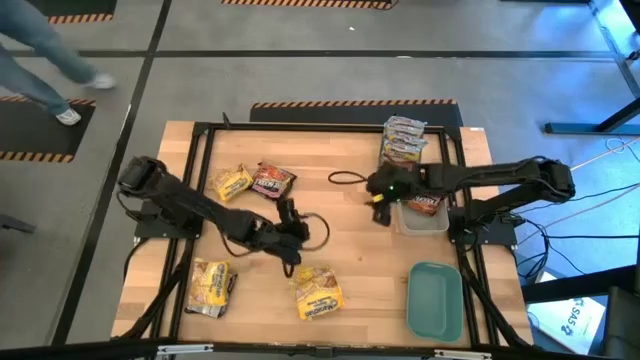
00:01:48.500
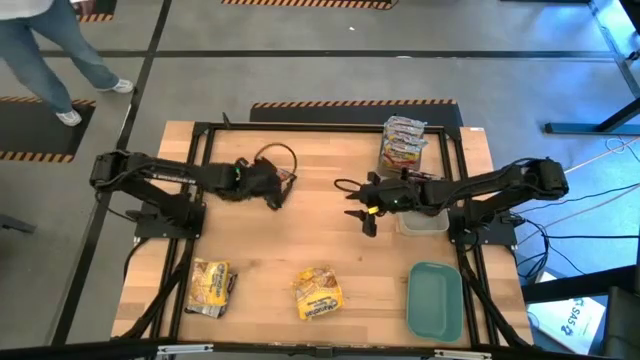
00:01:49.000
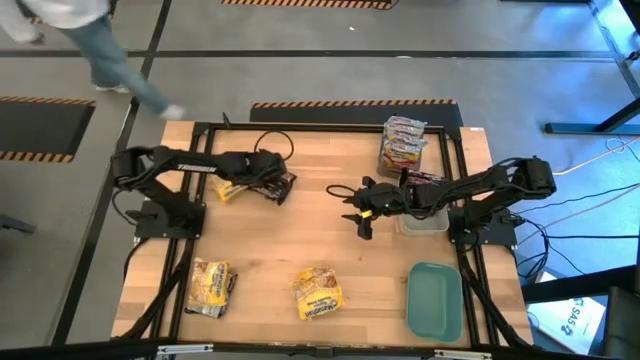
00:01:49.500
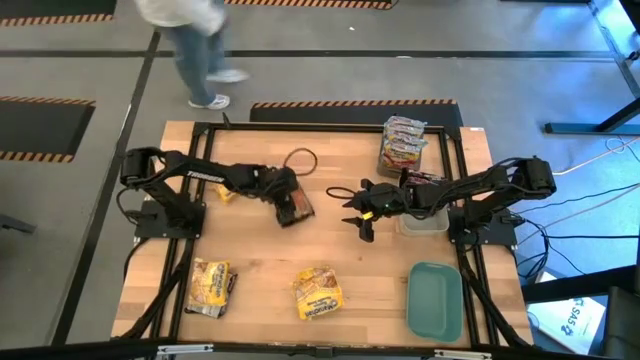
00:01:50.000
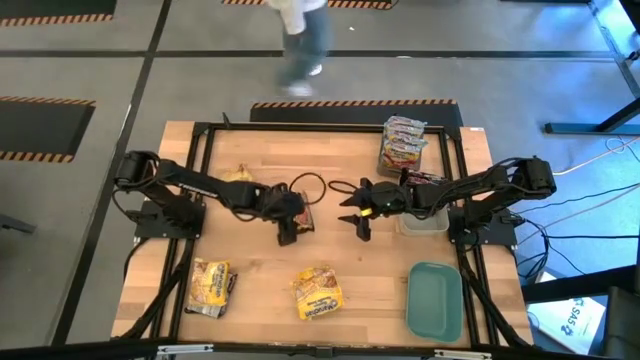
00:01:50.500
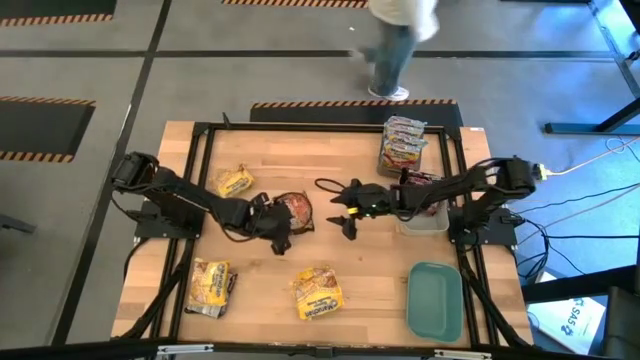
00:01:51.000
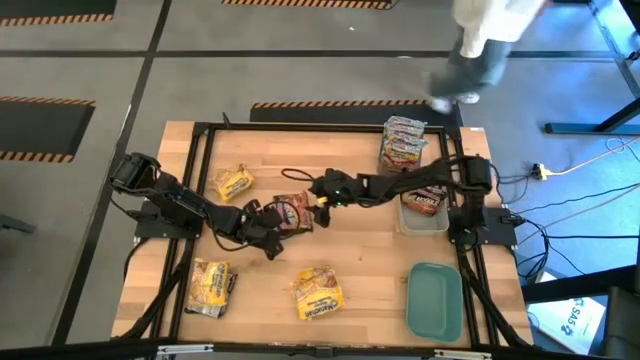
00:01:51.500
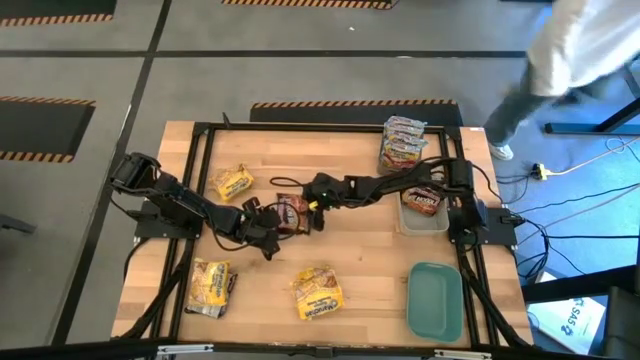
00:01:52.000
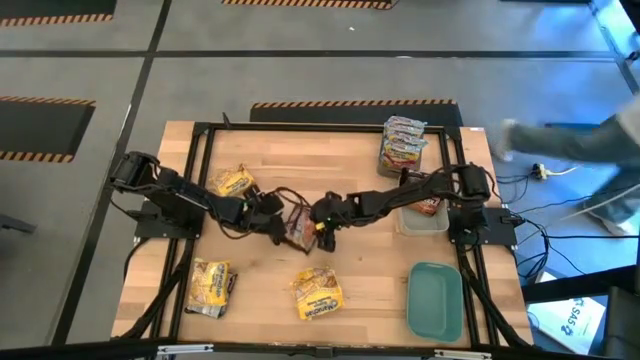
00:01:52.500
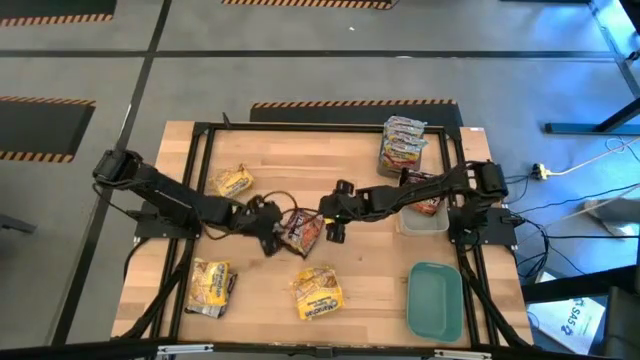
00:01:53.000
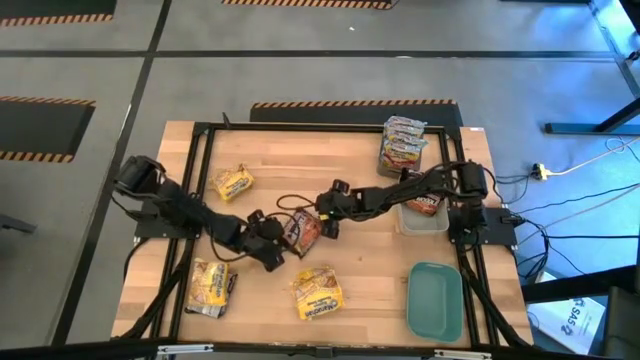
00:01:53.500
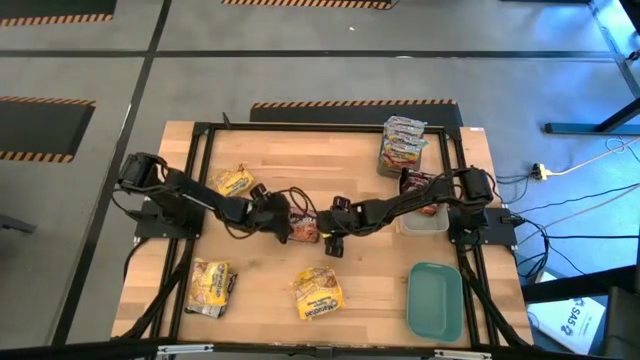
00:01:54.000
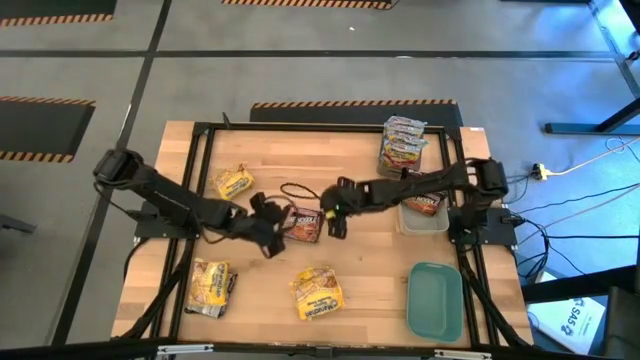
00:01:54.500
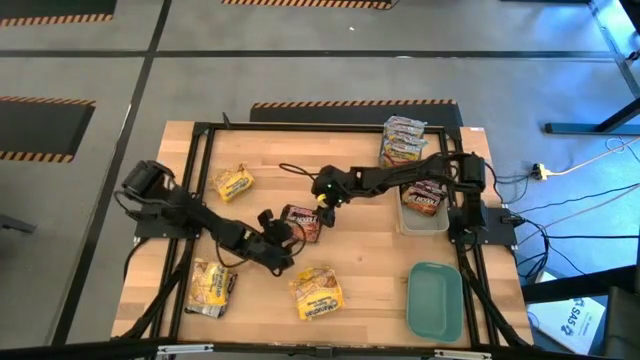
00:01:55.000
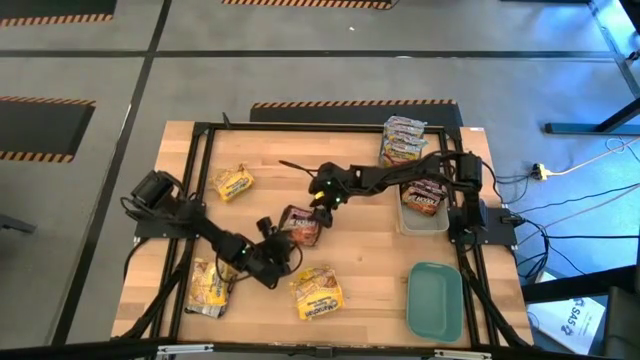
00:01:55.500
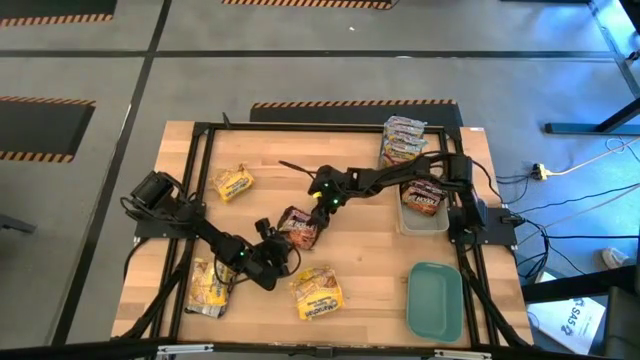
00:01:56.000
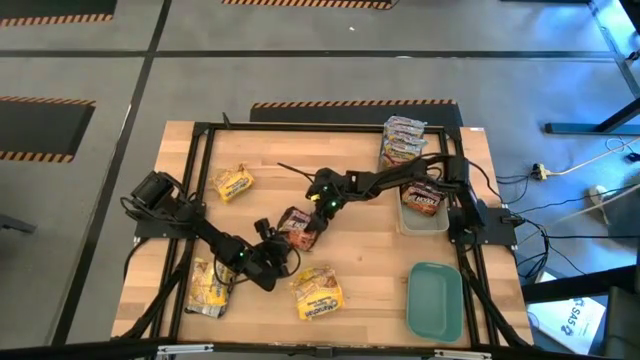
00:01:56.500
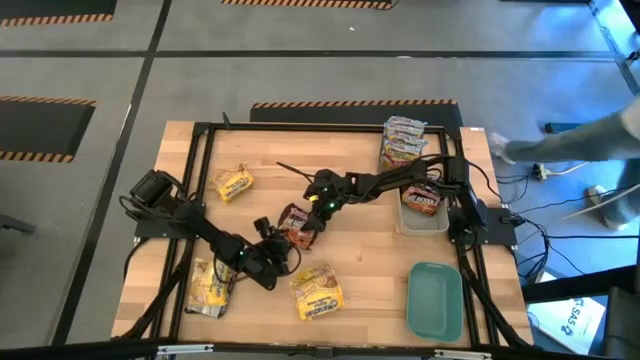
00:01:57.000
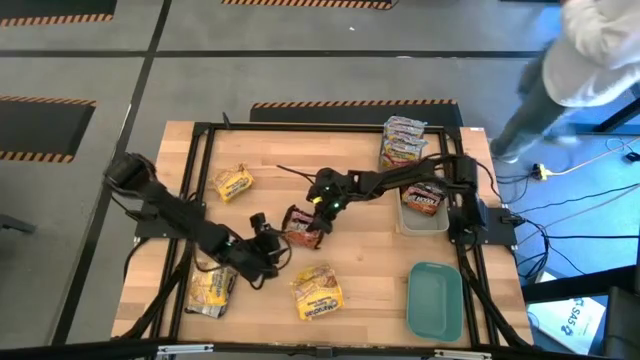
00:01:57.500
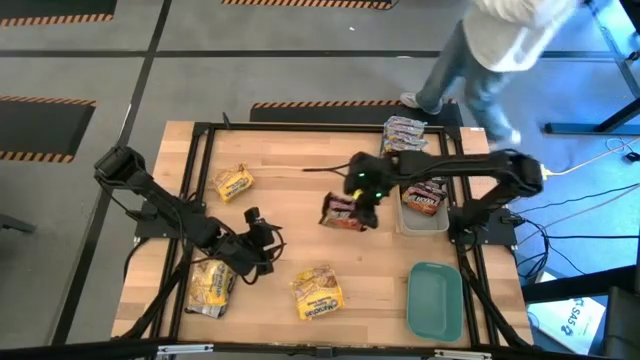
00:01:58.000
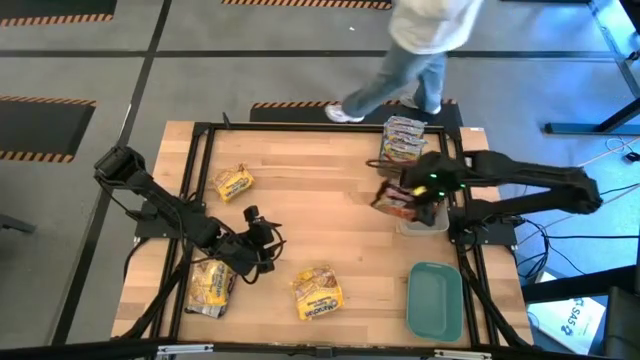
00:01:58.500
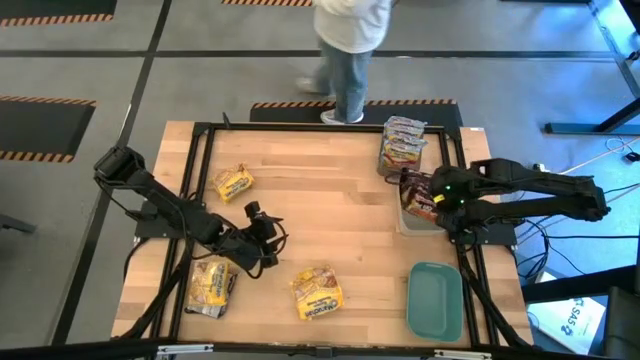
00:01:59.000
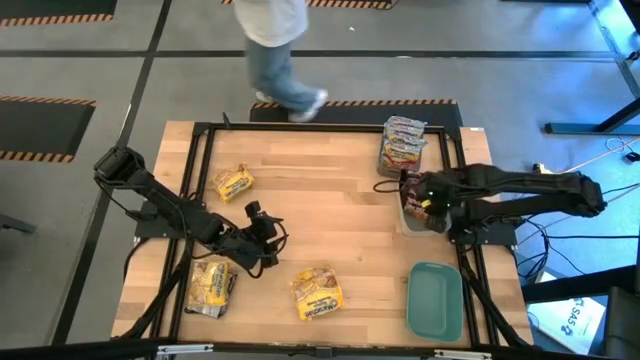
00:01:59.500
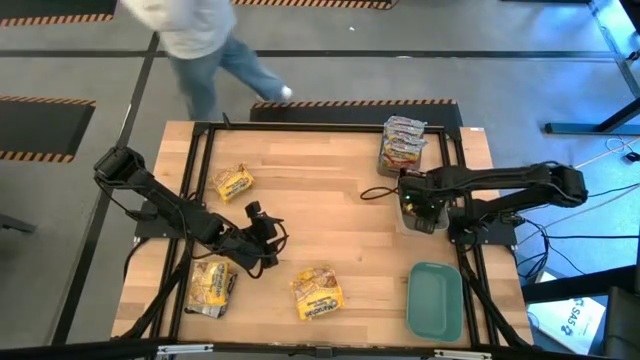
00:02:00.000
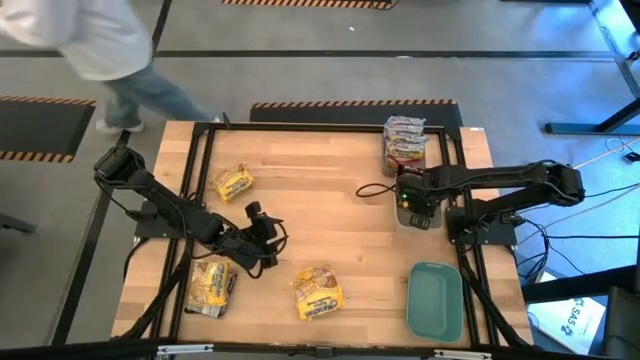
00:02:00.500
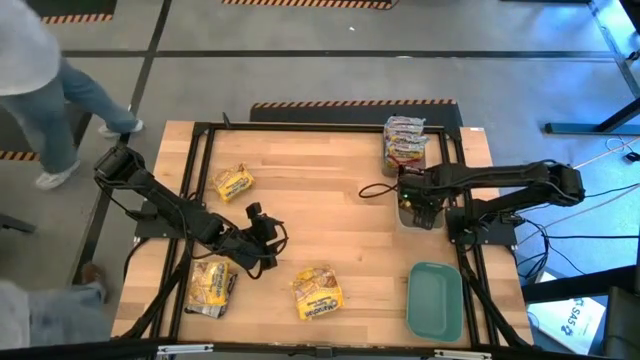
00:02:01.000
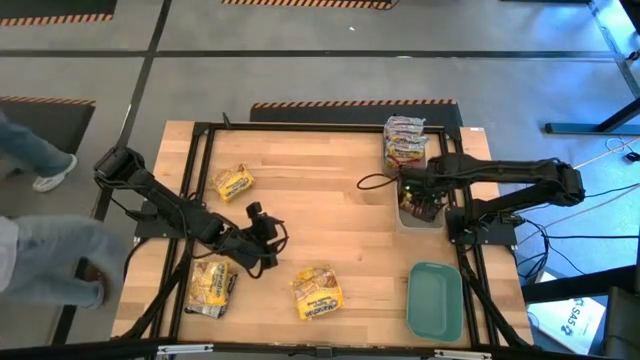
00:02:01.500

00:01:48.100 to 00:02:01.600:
Task: Sort Maruchan noodles
Put the top black noodle pack into the gray bin

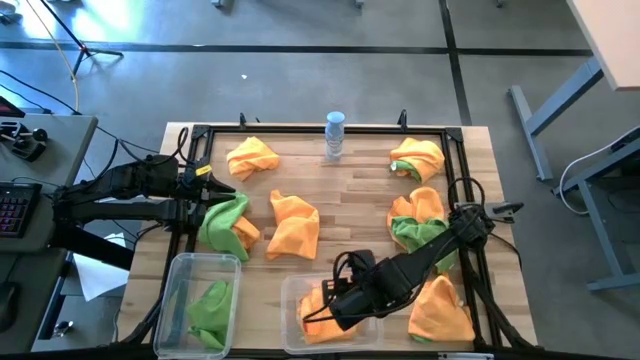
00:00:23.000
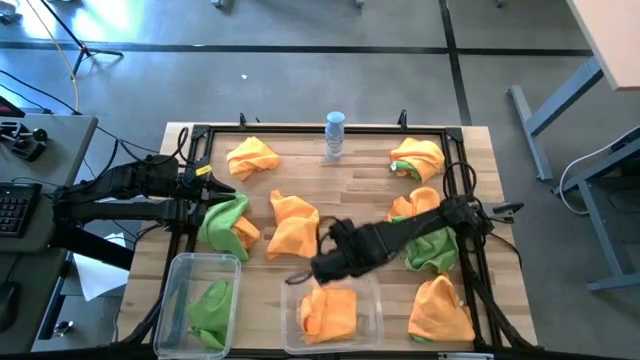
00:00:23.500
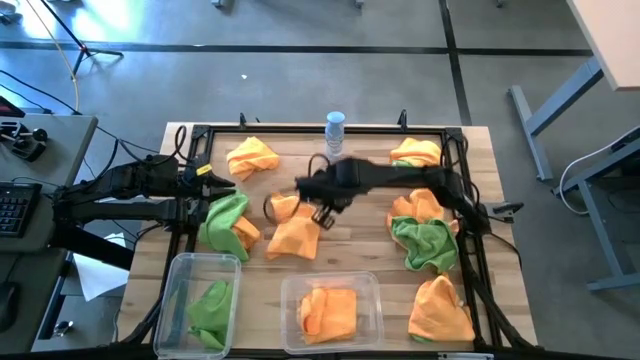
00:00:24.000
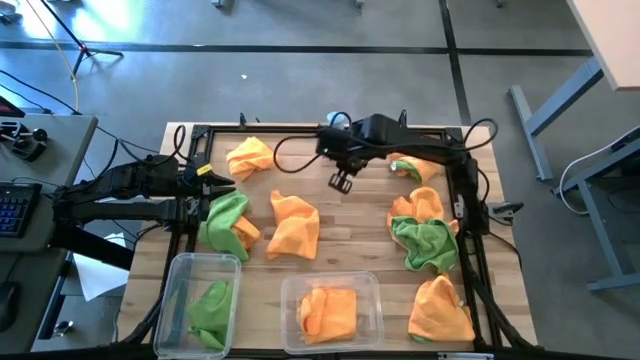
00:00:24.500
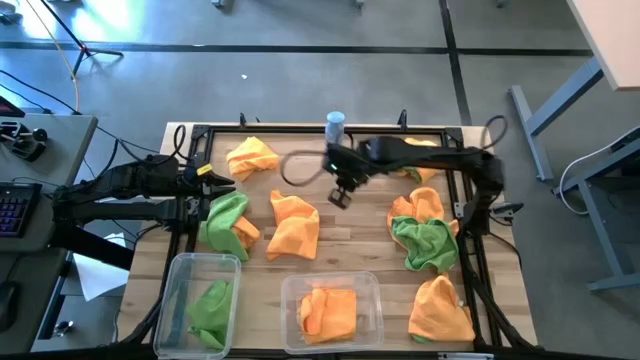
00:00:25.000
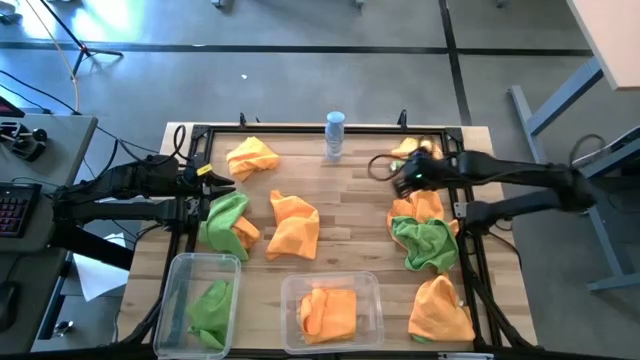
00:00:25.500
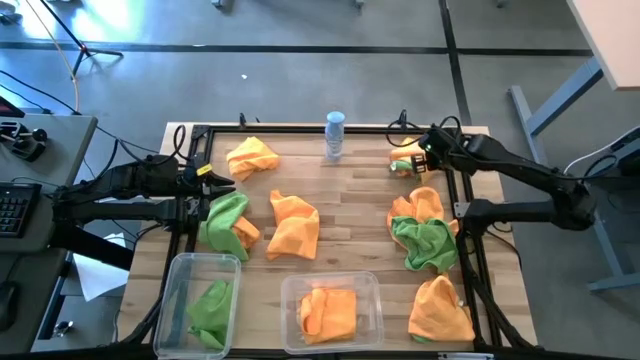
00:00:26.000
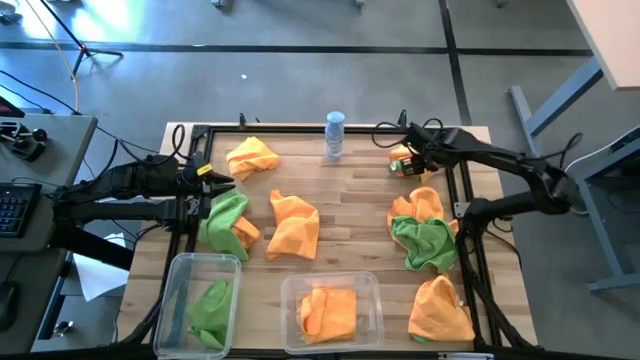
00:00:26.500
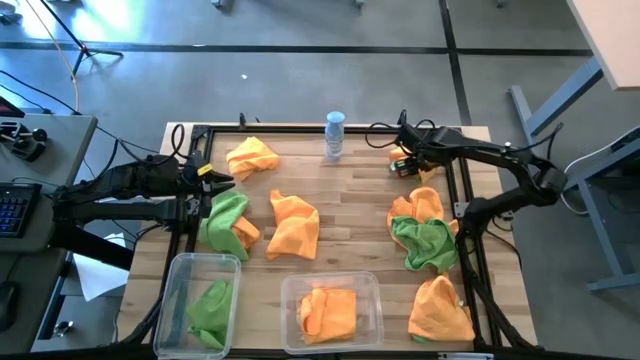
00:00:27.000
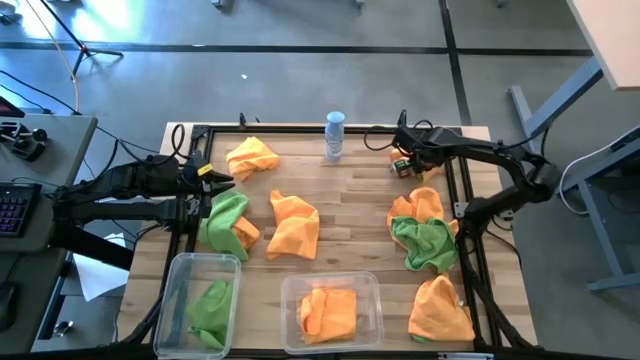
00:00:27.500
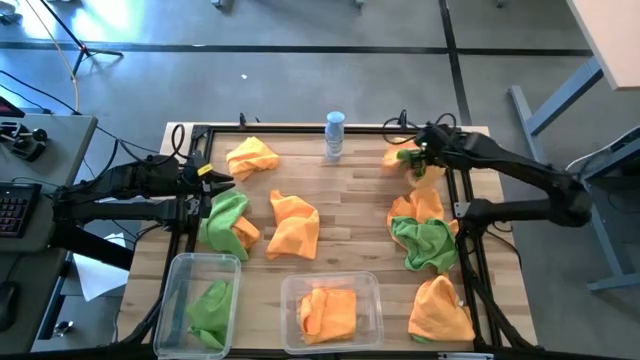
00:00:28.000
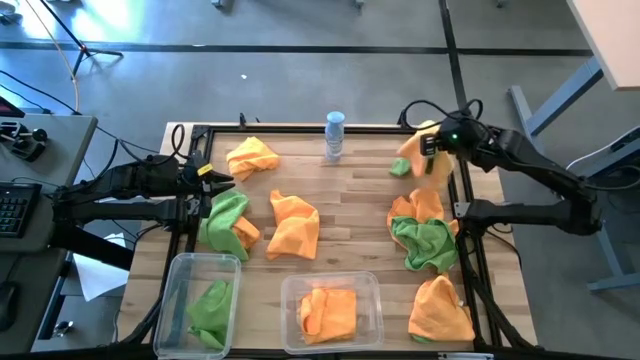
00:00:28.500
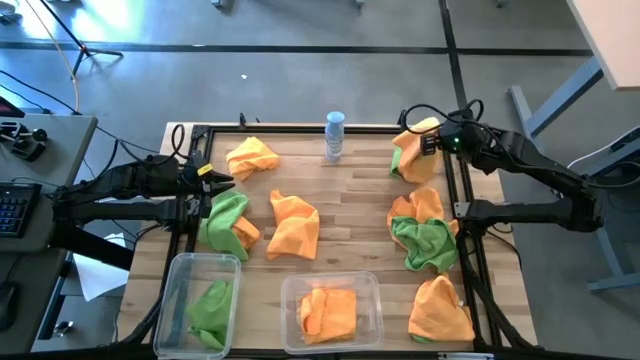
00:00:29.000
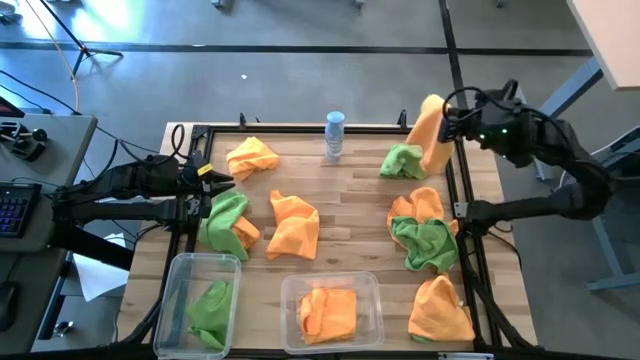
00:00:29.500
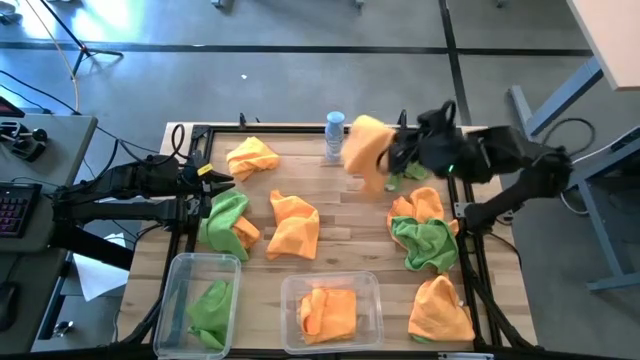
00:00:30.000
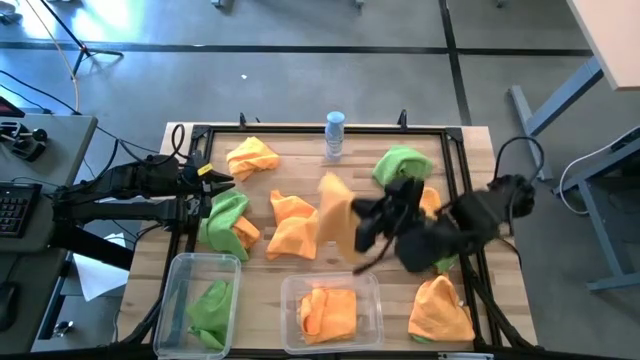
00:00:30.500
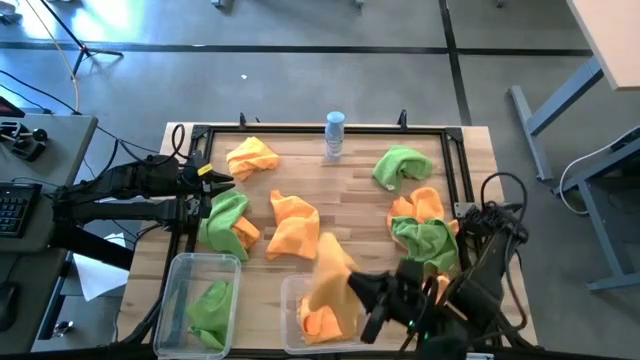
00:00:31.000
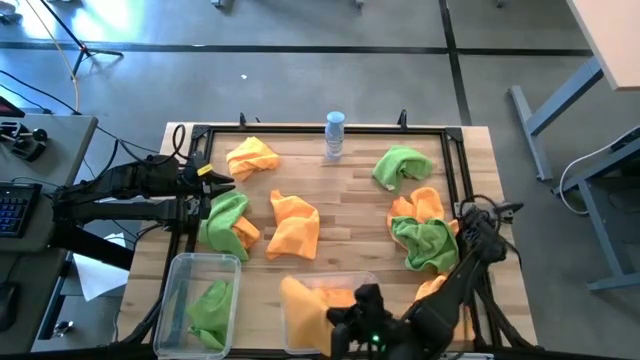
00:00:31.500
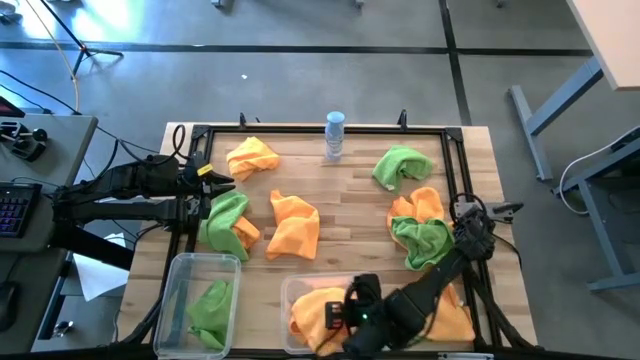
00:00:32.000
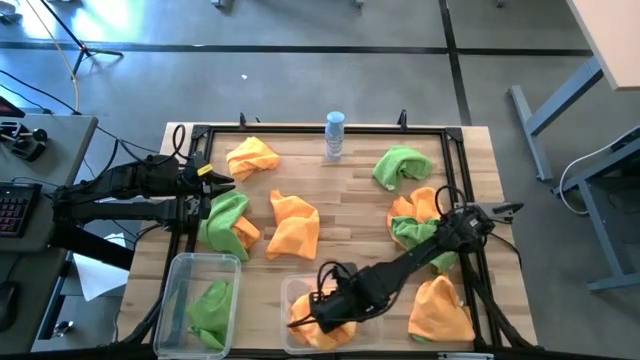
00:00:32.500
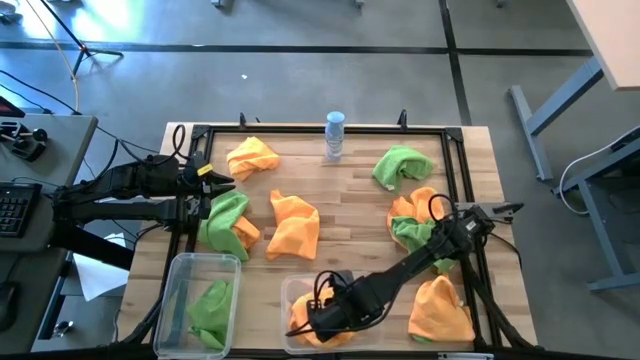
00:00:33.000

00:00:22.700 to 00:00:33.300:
Task: Sort microfiber towel by color & place in baskets
Put the orange microfiber towel into the right transparent bin
